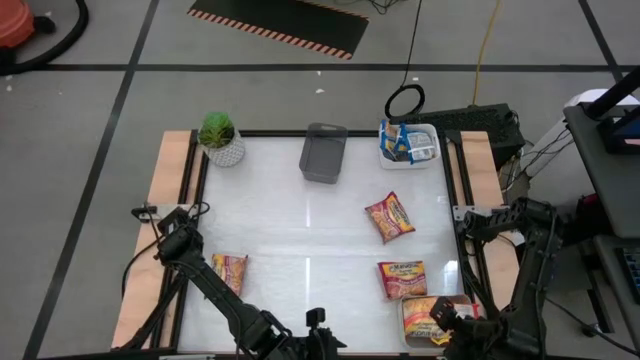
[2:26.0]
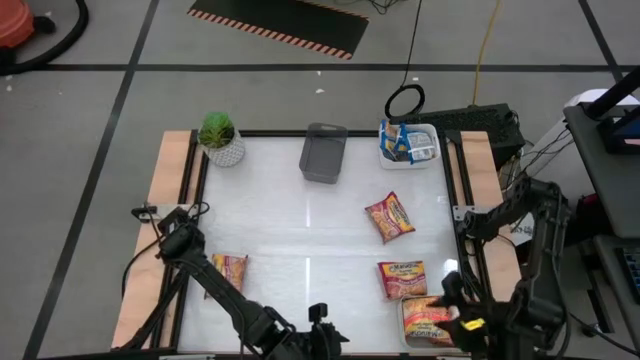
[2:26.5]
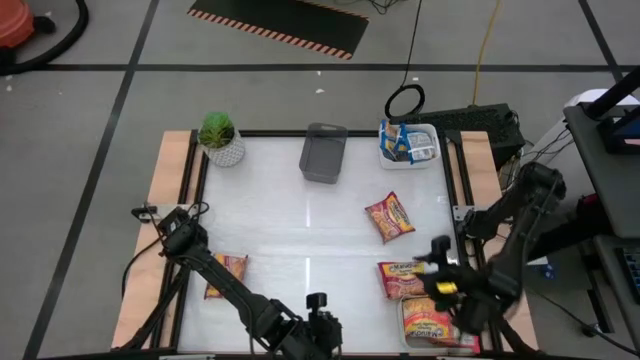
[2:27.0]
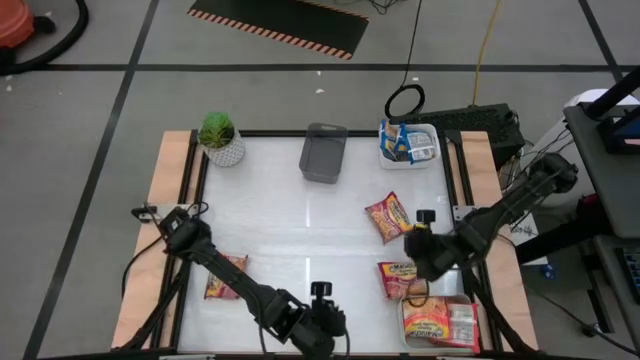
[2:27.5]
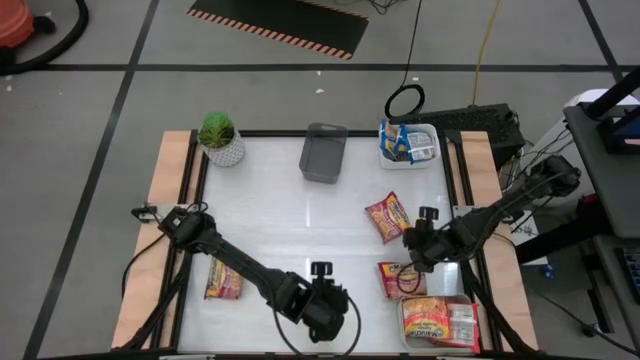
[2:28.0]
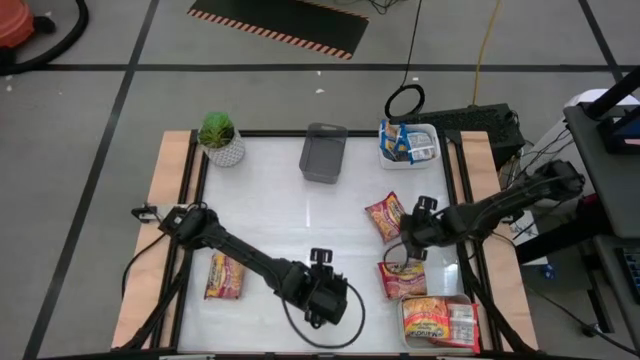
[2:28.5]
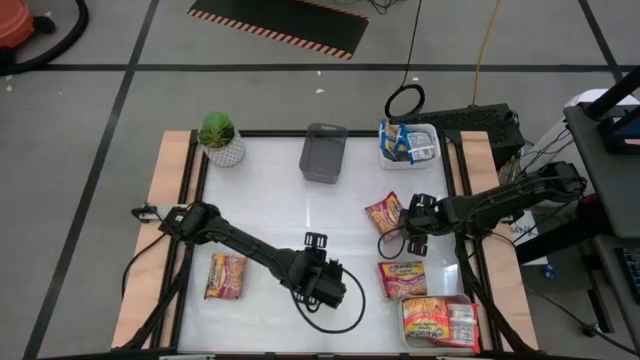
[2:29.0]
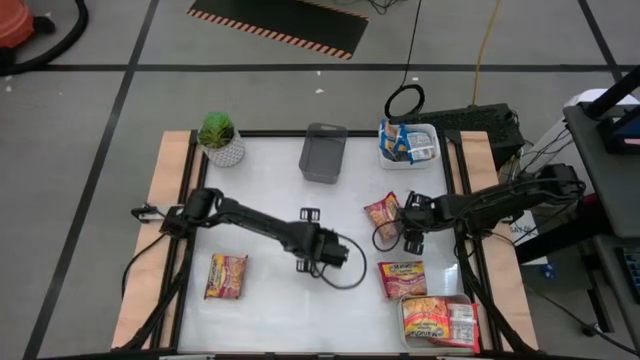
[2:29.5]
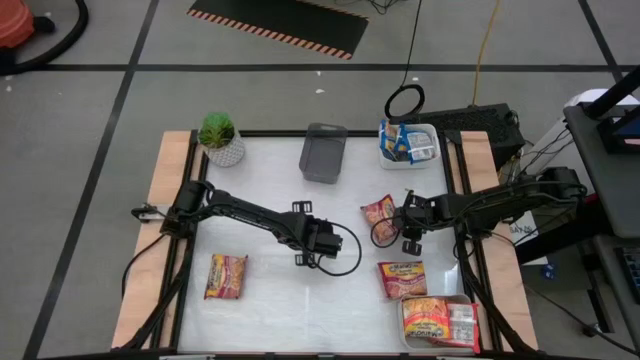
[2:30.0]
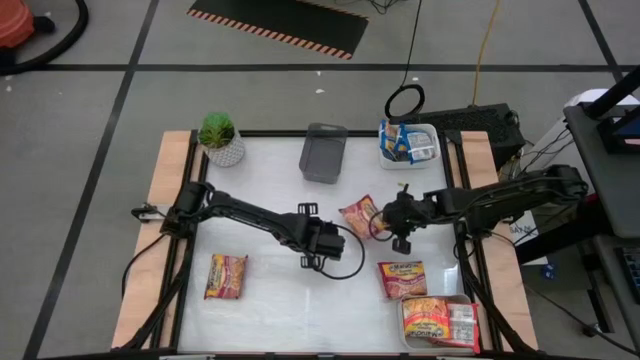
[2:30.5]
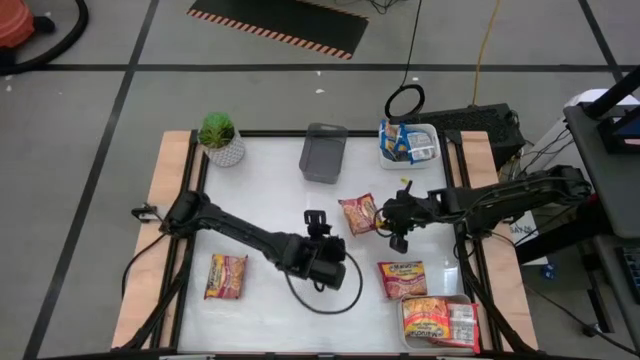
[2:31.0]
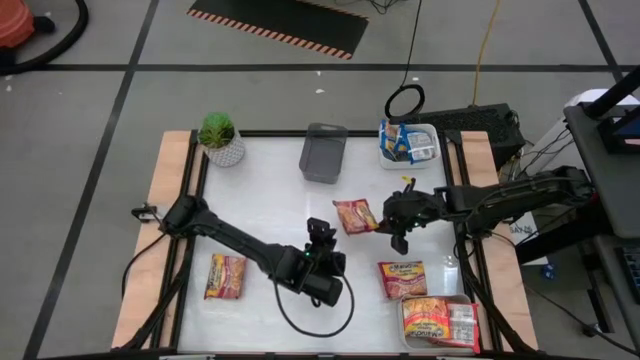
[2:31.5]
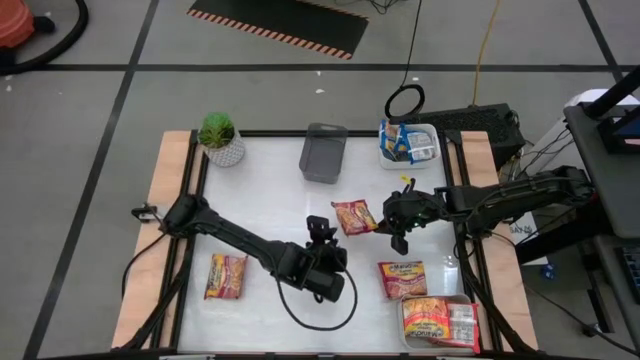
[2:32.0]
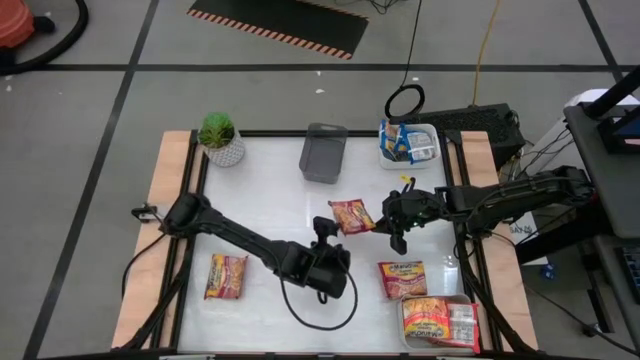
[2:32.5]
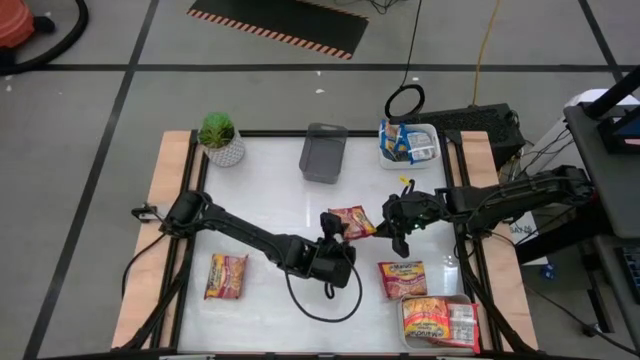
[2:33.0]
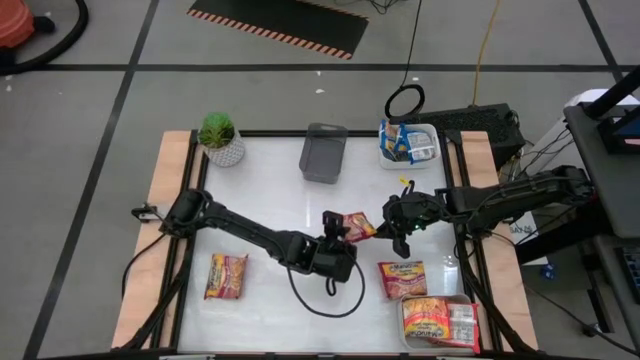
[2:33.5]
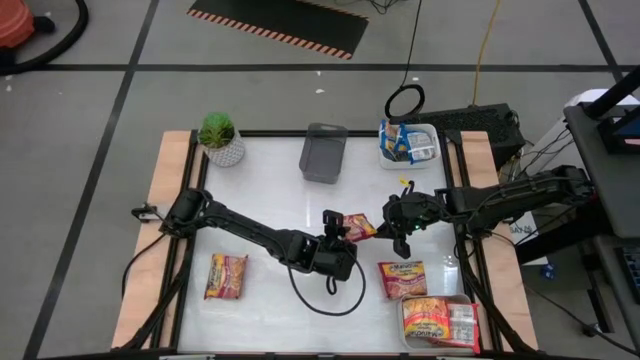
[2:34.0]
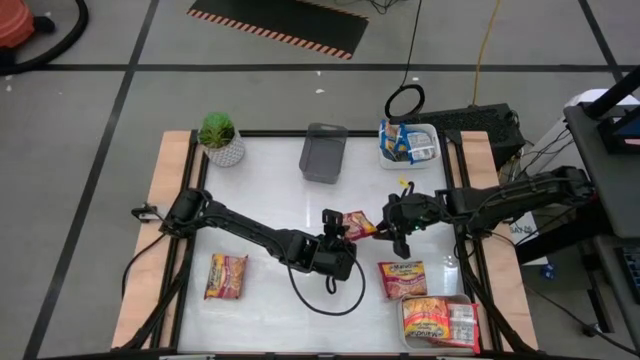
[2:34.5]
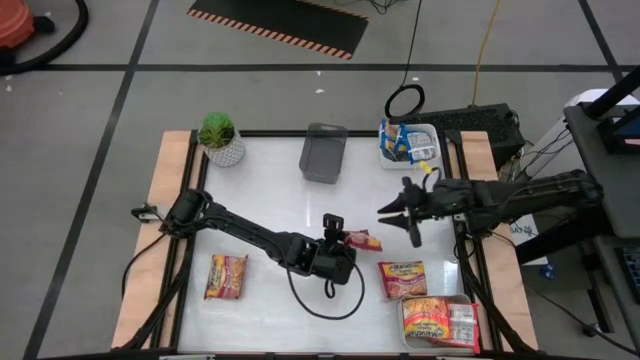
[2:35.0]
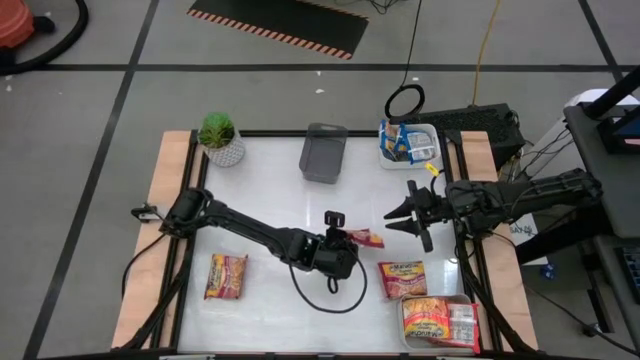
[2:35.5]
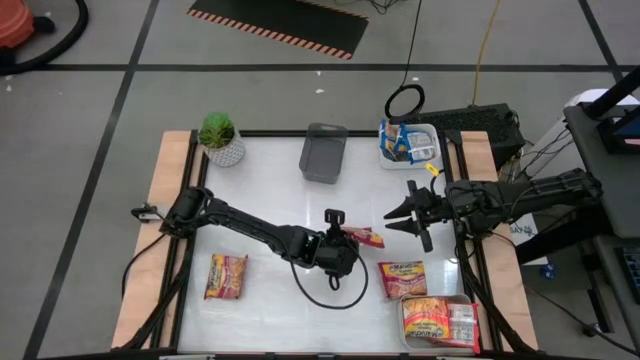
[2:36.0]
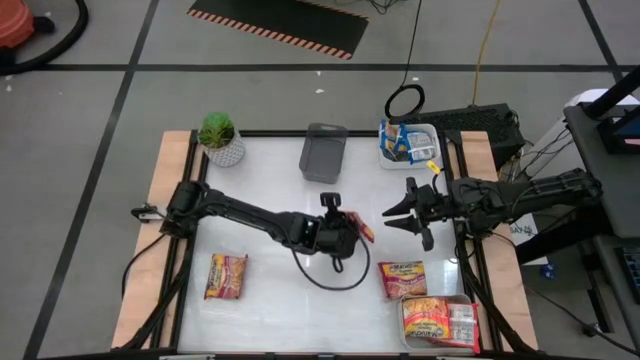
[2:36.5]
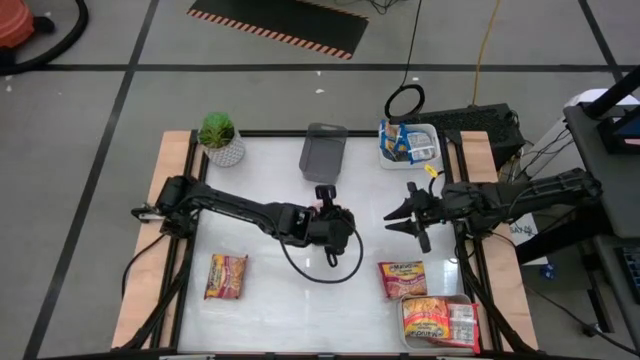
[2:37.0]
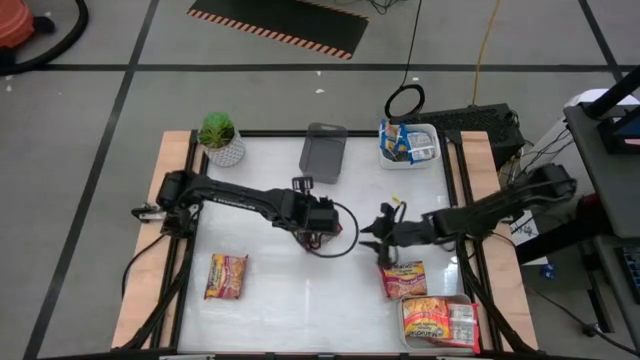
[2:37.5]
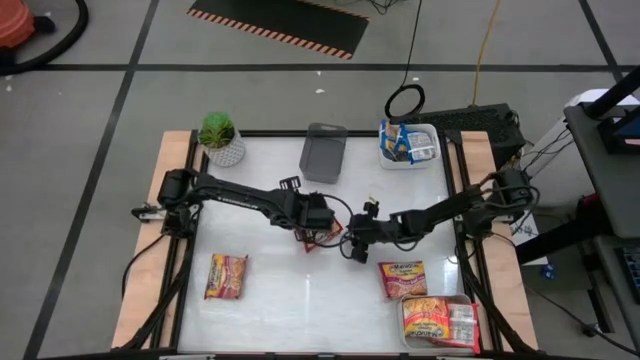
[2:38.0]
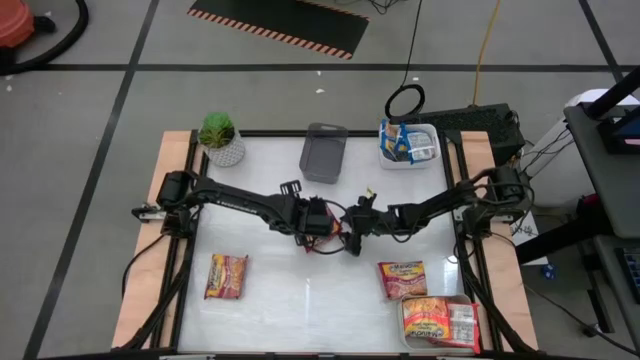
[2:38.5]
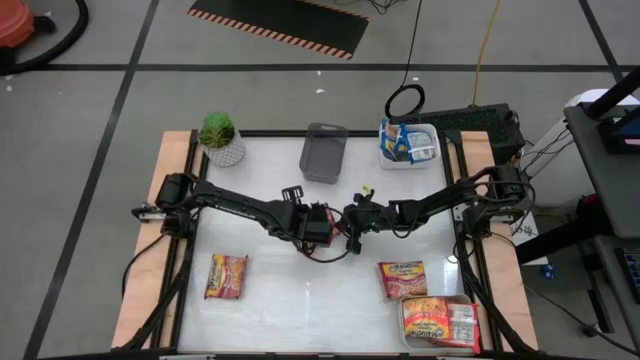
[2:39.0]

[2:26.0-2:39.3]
Task: Sort Maruchan noodles
Put the top right red noodle pack into the black bin

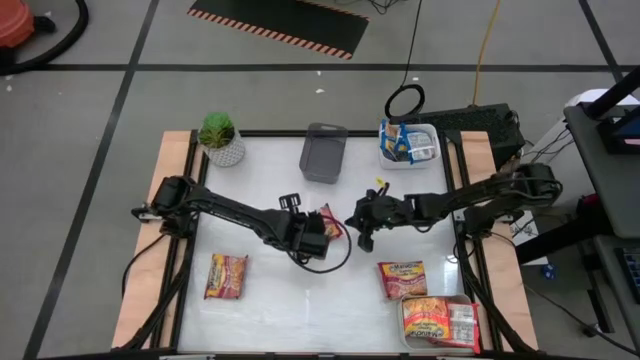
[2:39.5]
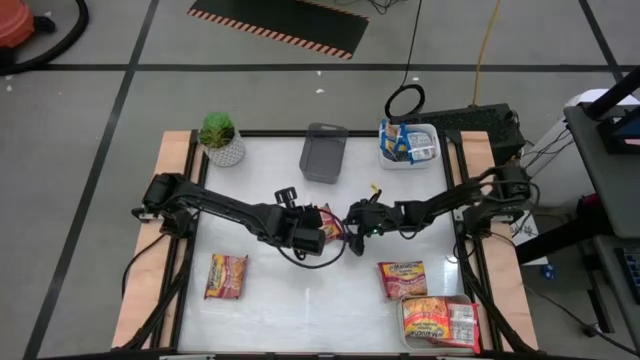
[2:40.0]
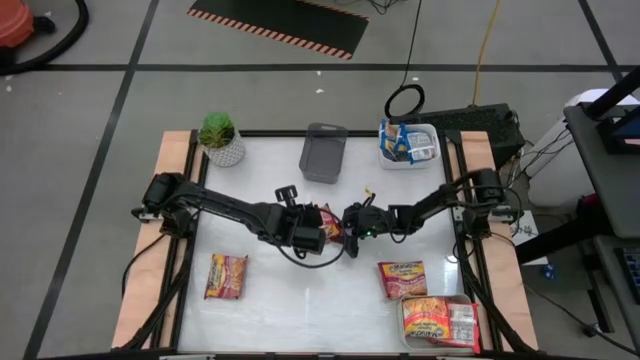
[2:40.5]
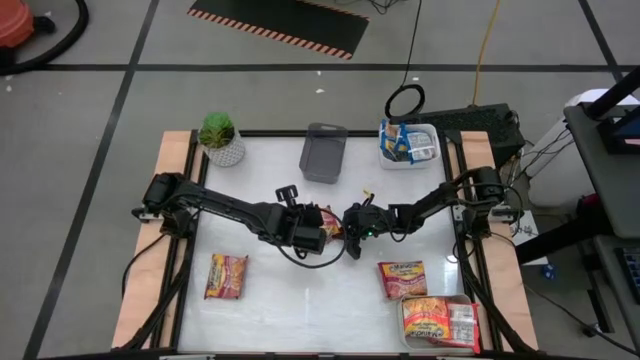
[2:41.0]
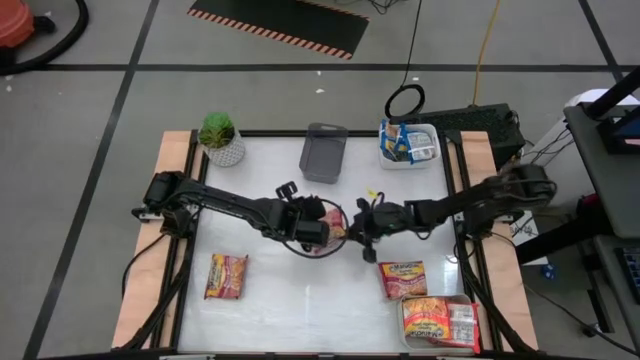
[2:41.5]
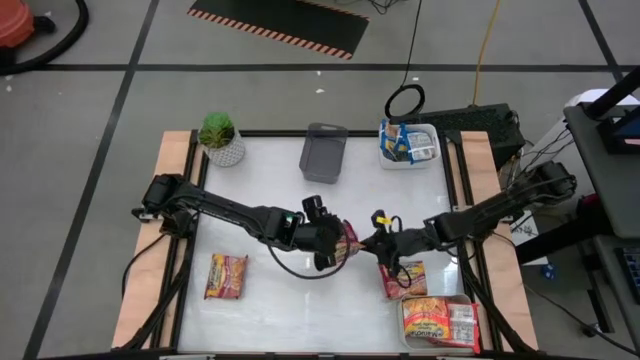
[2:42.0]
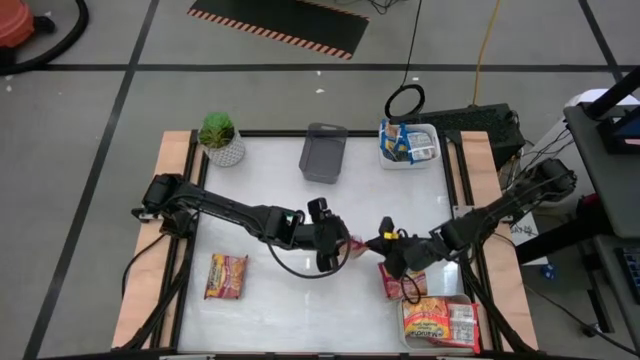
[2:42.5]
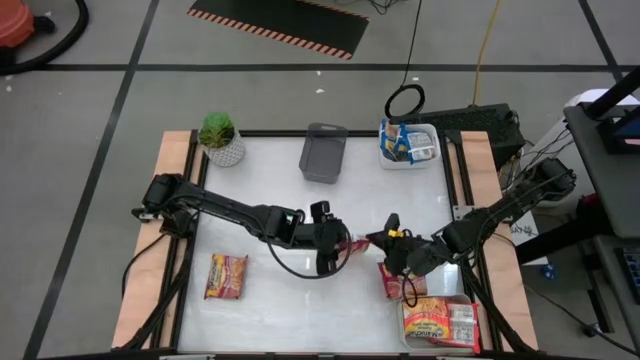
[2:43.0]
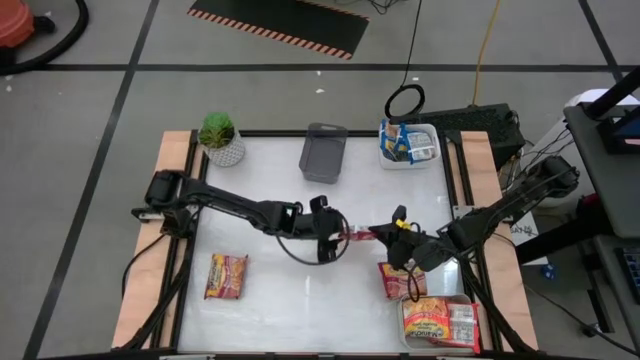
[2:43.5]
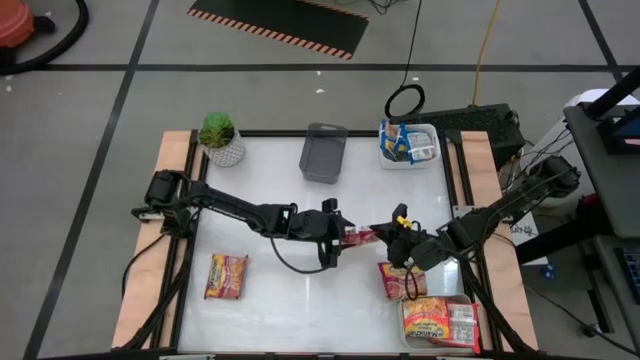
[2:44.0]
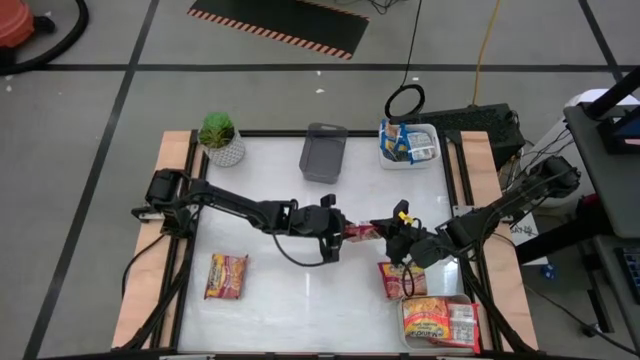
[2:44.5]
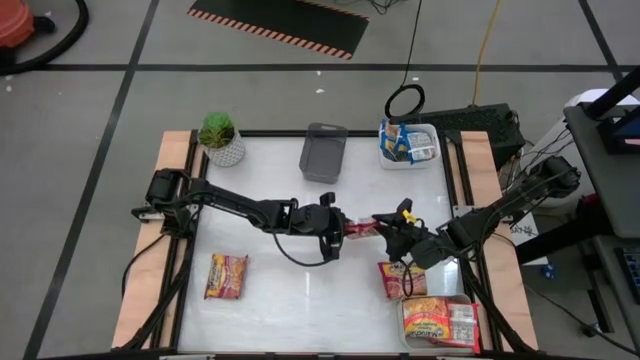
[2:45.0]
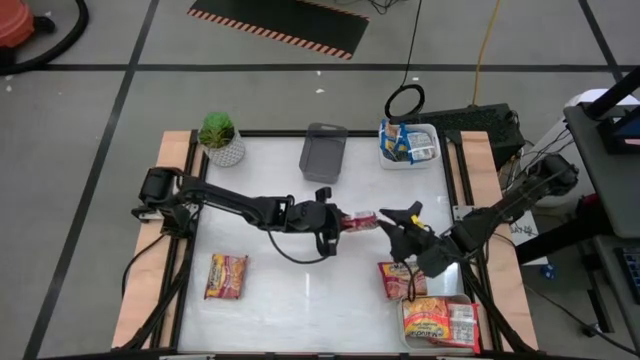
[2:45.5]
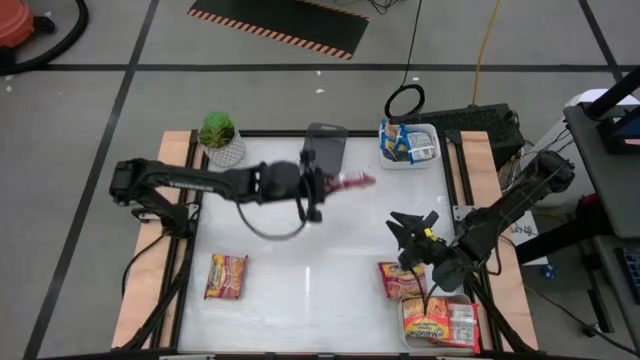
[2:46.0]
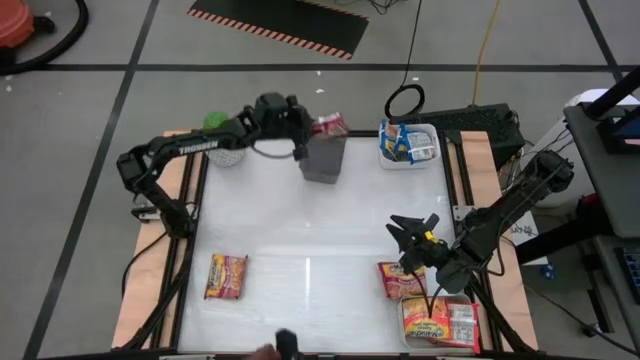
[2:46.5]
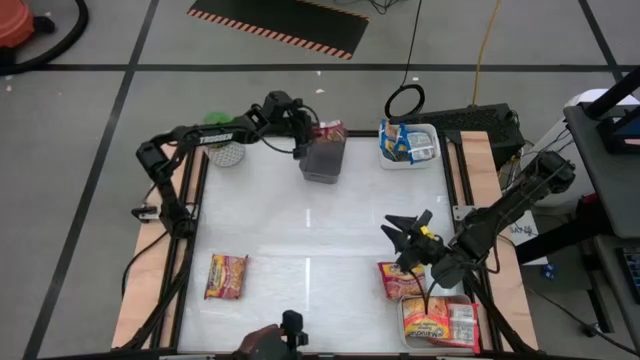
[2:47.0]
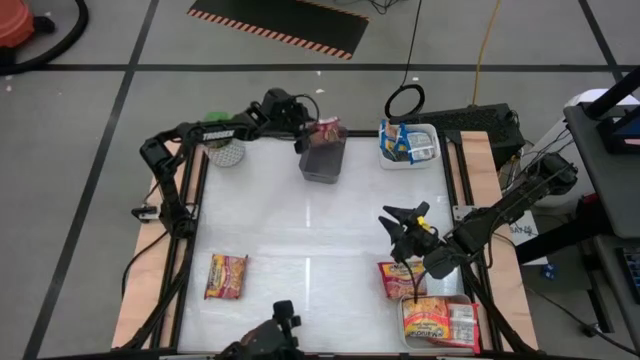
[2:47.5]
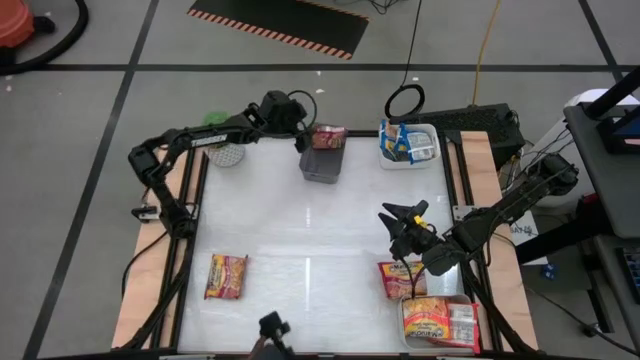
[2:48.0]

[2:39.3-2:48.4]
Put the top middle red noodle pack into the black bin
